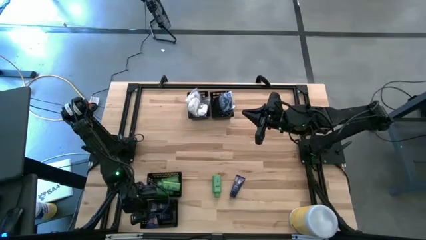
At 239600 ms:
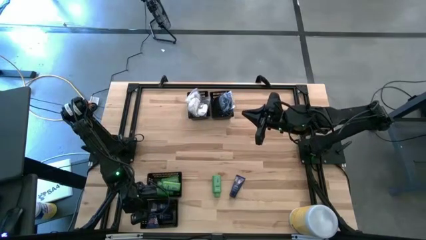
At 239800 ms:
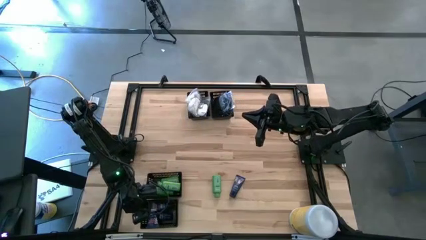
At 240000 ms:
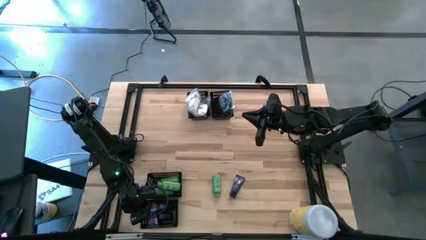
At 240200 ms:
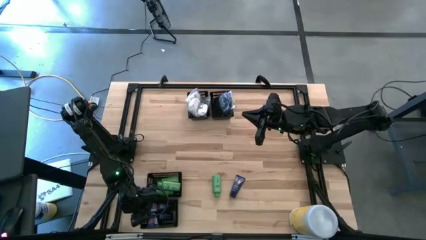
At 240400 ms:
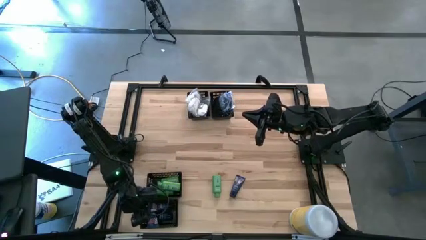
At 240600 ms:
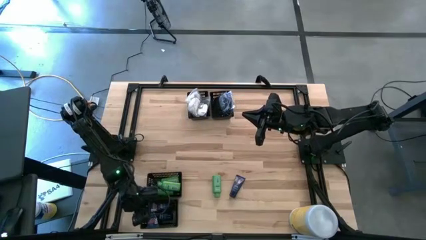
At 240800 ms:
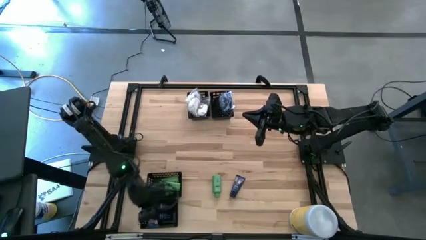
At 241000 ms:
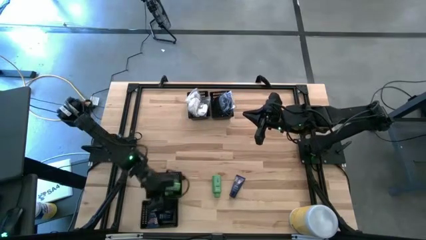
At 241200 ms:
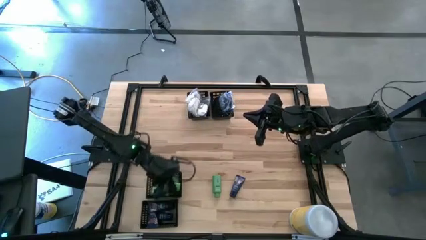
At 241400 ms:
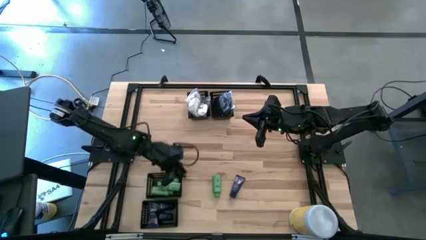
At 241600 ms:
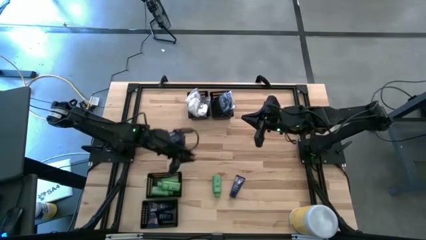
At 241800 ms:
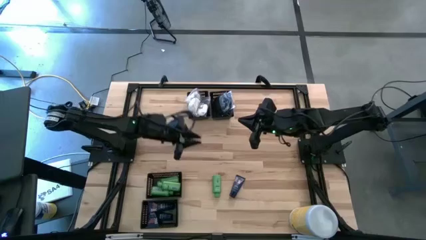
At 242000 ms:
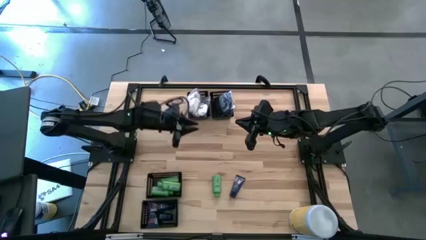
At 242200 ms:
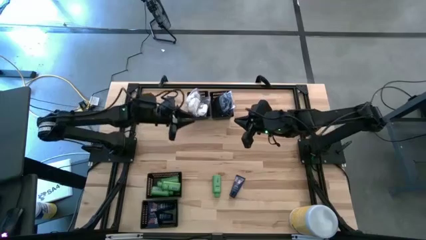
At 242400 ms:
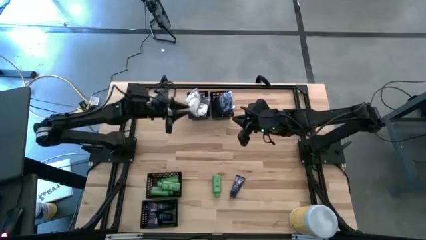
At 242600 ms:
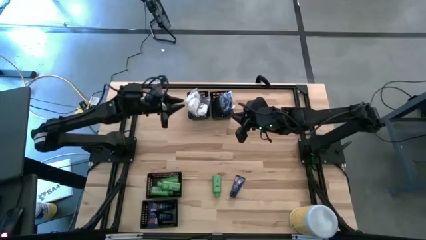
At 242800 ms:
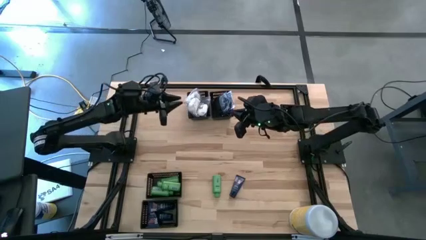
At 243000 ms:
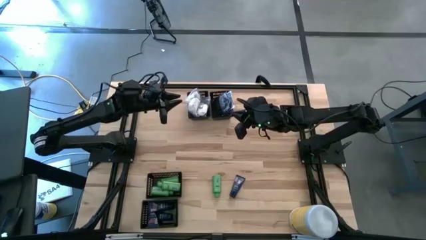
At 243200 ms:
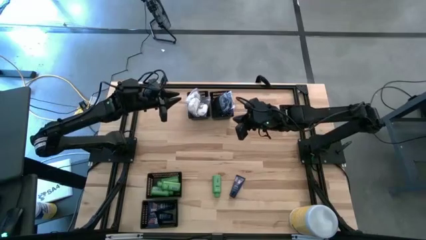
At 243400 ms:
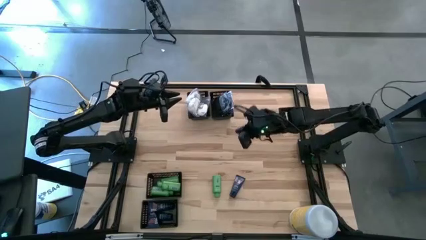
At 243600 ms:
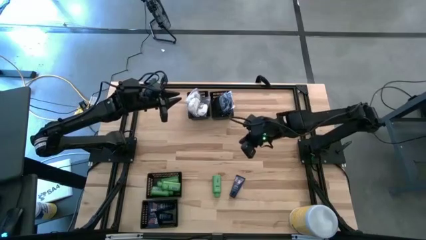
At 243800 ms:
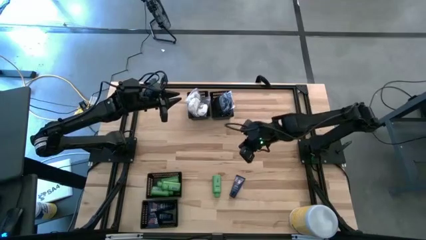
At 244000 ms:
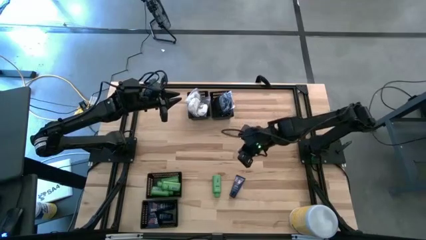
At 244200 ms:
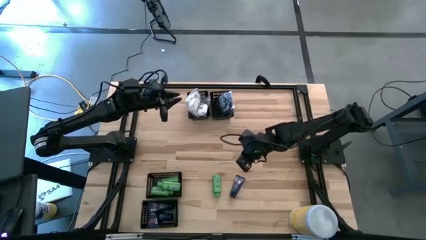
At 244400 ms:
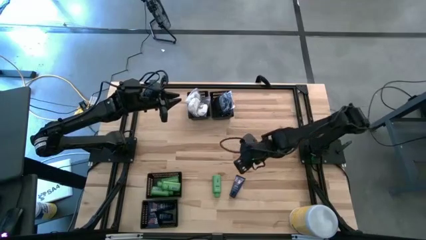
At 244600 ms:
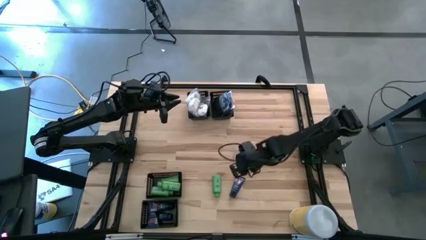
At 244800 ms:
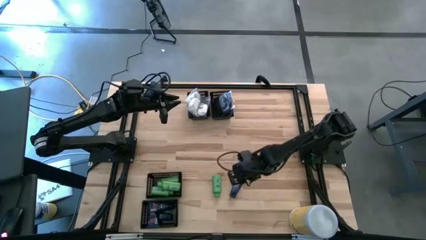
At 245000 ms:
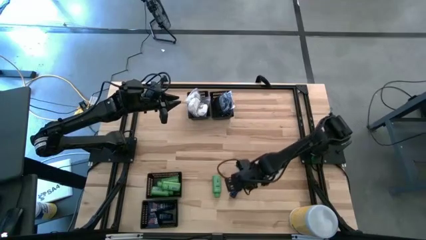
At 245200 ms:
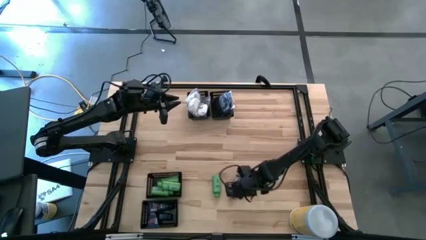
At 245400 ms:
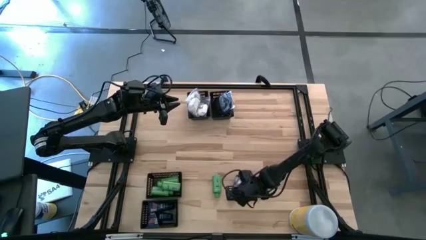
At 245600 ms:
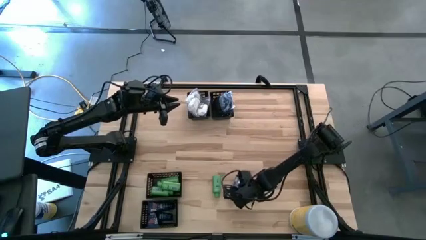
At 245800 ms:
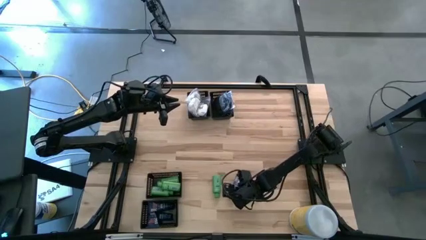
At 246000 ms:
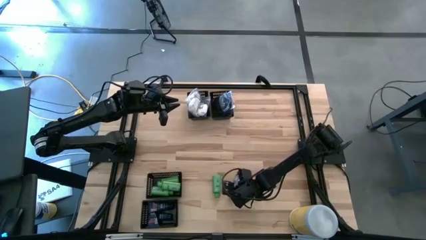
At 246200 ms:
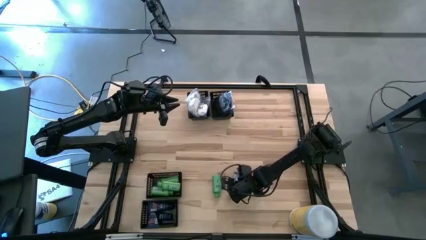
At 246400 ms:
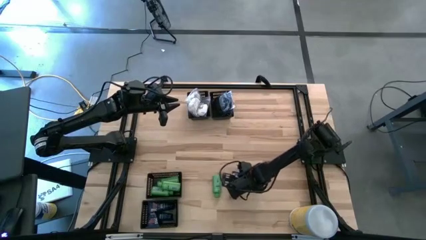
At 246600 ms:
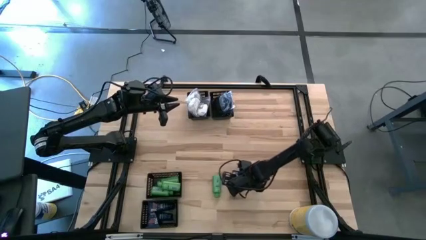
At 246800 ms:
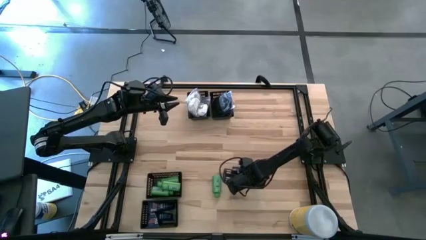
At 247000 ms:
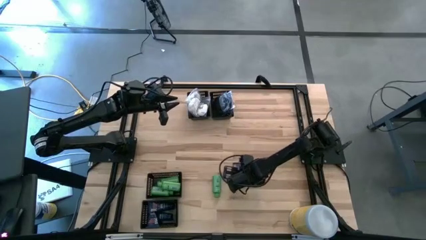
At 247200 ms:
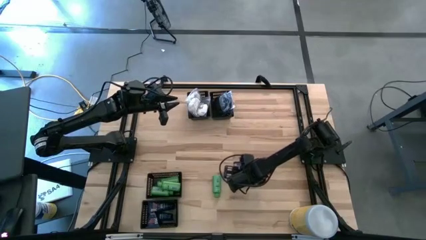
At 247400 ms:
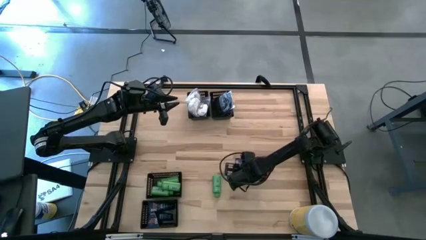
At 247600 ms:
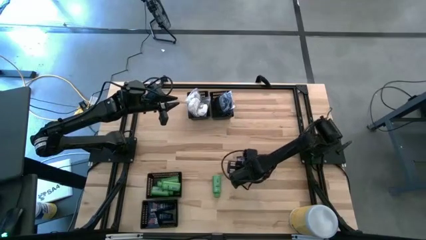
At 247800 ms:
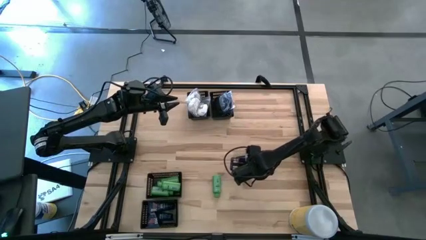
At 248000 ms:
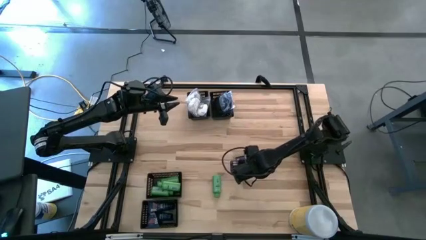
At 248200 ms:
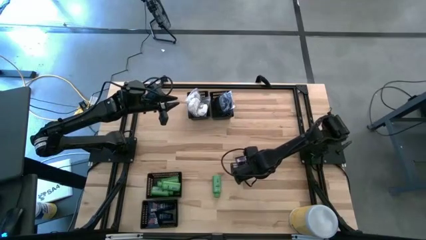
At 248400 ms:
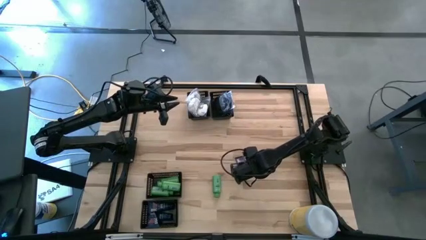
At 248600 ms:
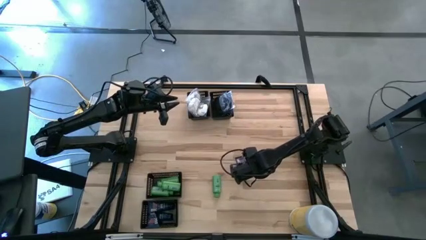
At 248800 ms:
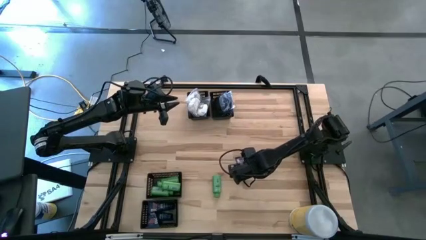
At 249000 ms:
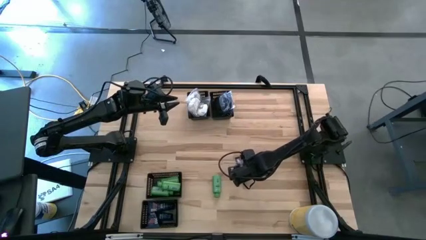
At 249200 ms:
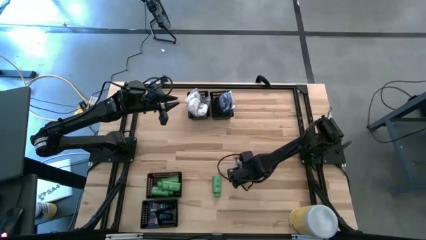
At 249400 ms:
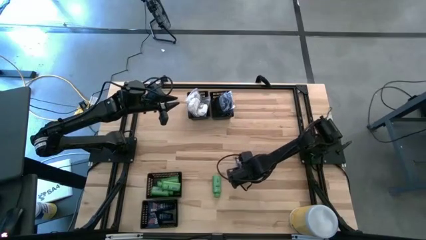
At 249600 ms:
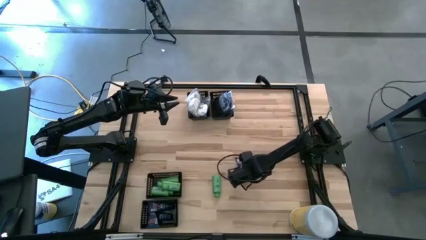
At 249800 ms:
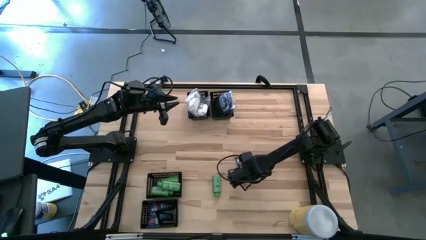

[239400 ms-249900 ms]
Task: Pick & Place Travel size toiletries
Put the dark blue shave cream into the bottom left basket

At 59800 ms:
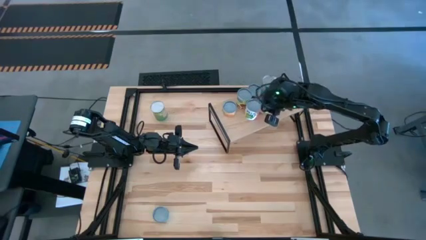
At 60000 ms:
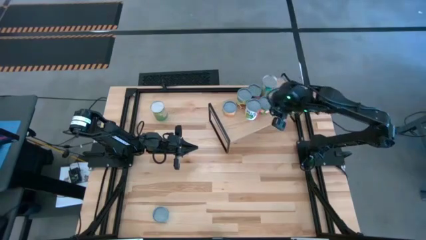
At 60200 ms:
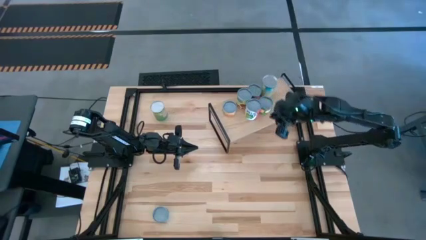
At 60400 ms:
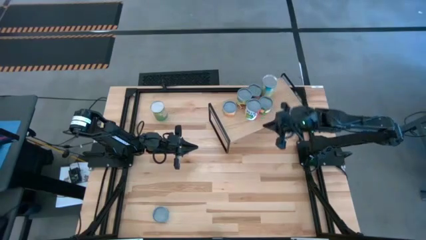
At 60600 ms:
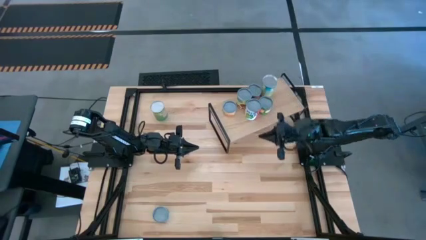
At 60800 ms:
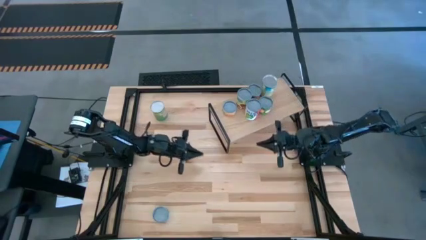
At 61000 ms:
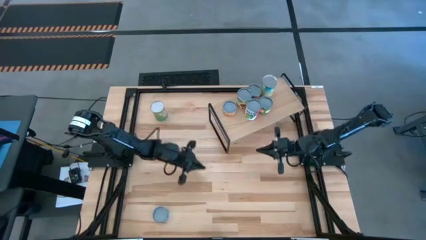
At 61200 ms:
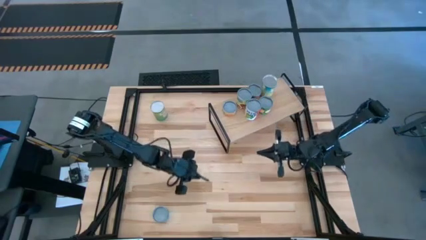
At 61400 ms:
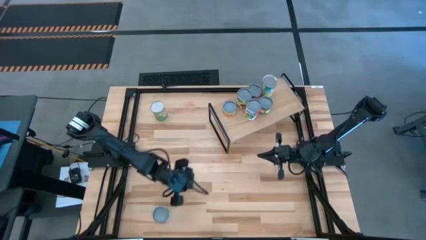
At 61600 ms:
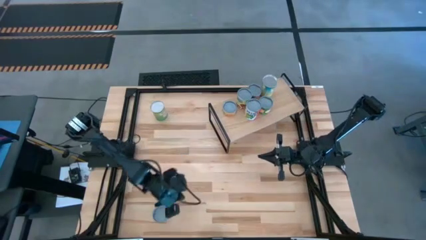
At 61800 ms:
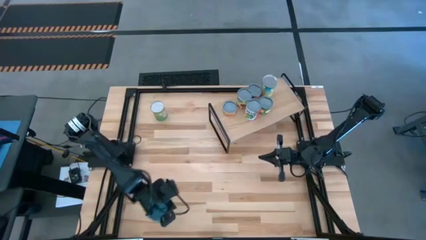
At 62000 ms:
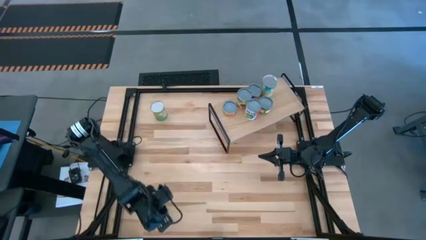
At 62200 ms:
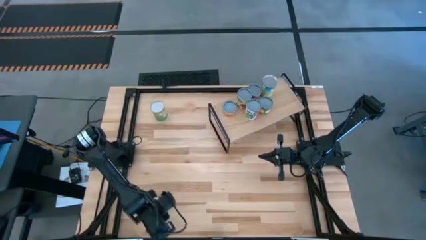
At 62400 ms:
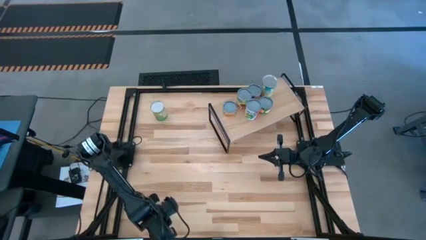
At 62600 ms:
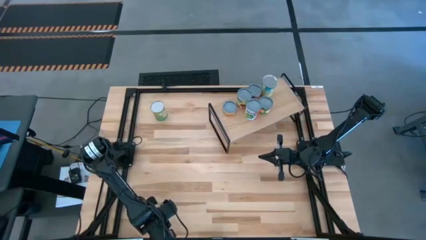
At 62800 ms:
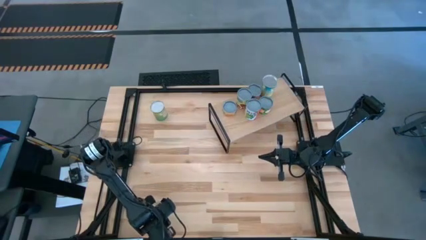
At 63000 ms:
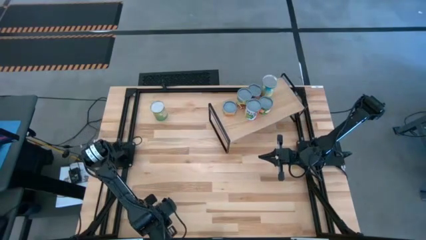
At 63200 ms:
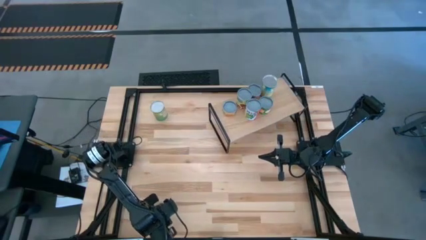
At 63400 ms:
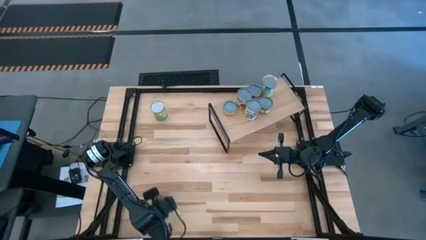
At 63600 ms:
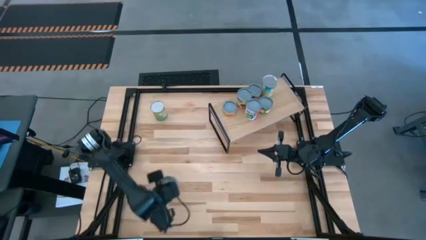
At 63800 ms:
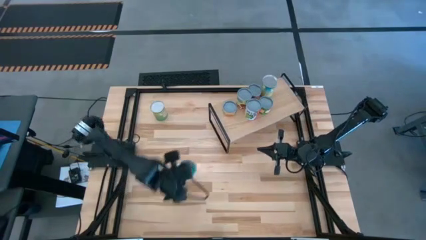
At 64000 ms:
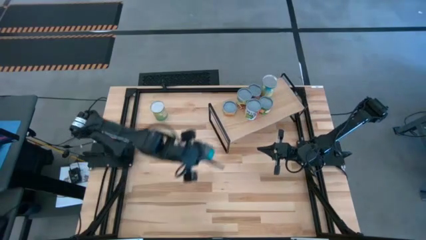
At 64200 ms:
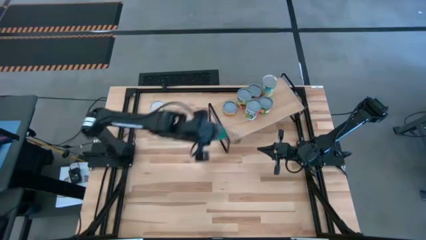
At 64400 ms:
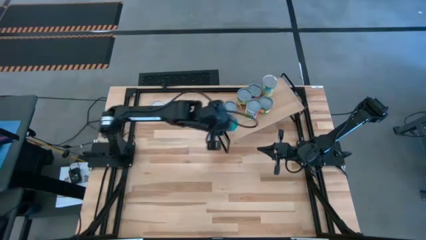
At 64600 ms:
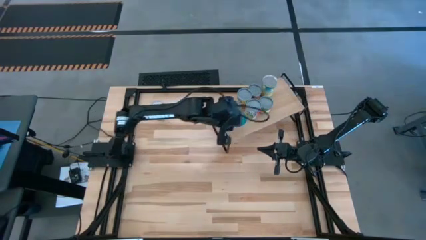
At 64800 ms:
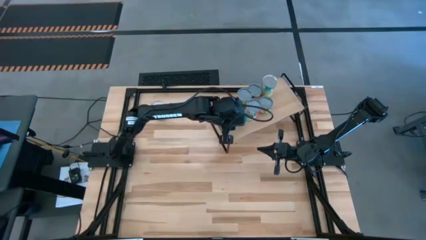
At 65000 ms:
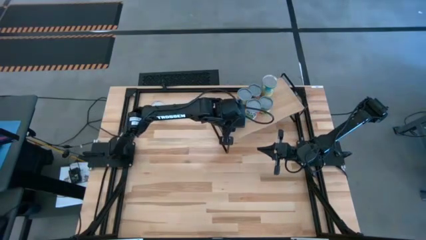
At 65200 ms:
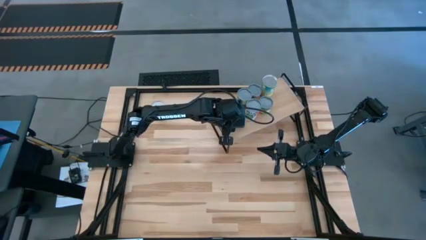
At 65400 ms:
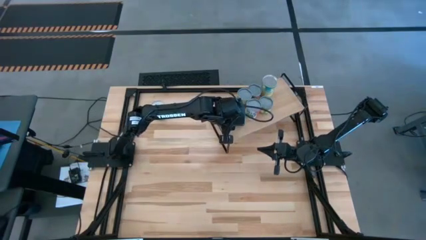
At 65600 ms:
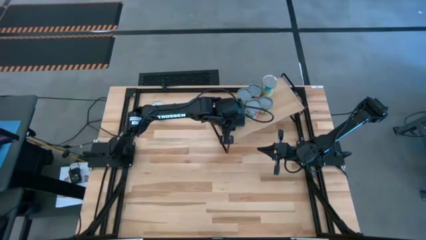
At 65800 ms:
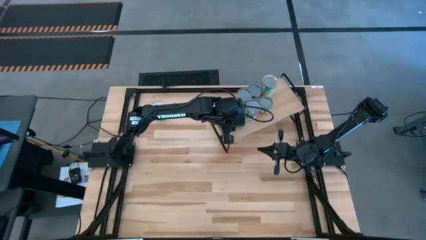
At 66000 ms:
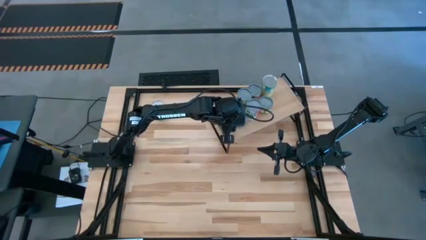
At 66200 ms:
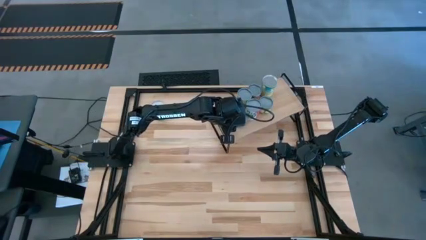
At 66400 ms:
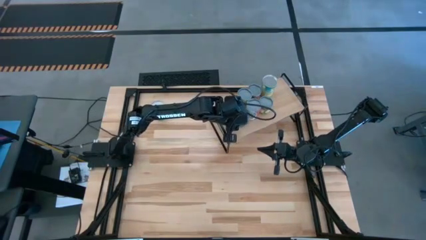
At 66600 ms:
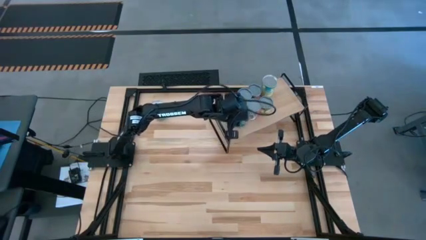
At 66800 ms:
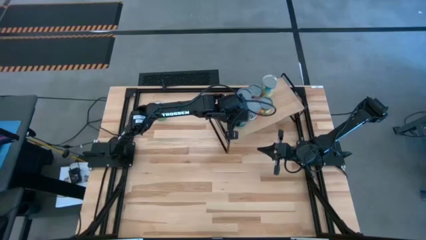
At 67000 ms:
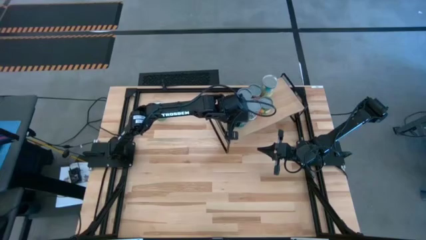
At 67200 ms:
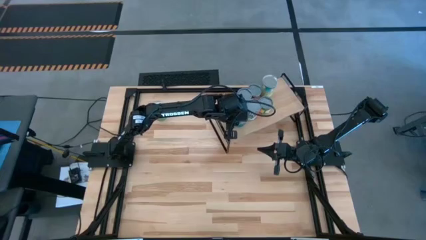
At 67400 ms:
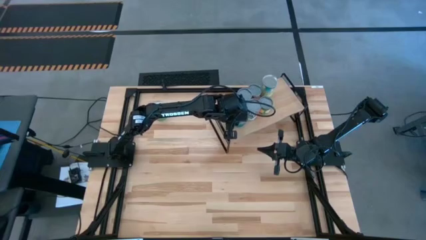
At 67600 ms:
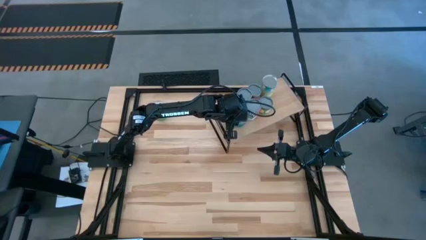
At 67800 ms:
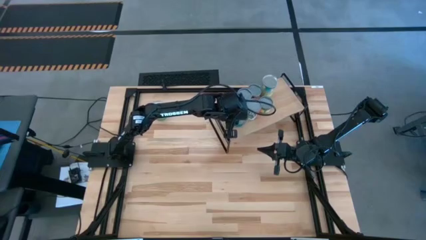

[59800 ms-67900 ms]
Task: Pick and place cans onto a shelf
Put the canned tuna on the shelf
